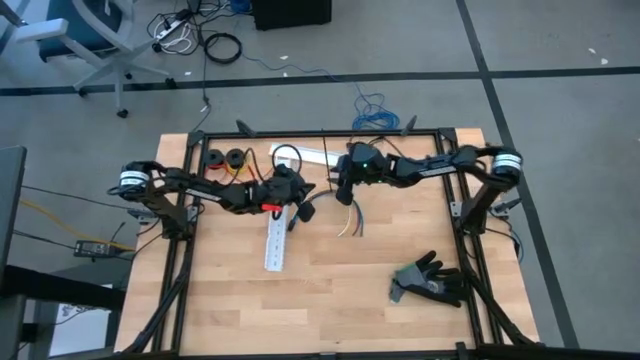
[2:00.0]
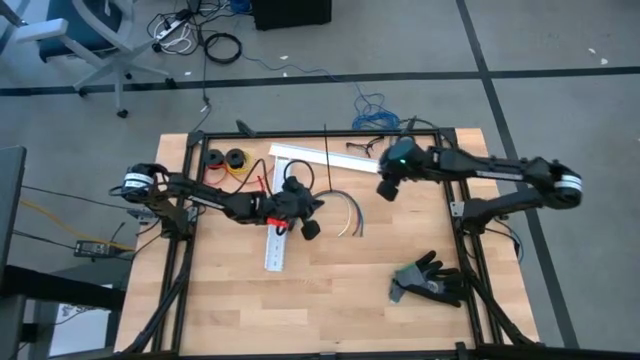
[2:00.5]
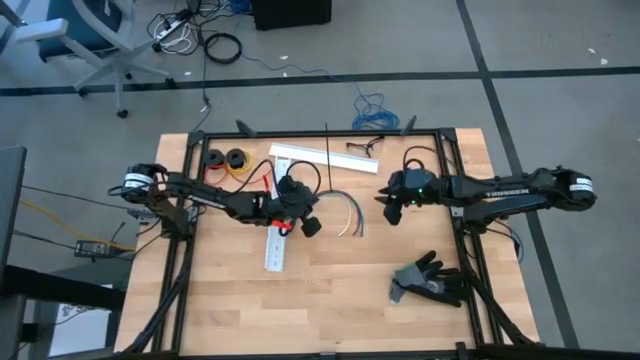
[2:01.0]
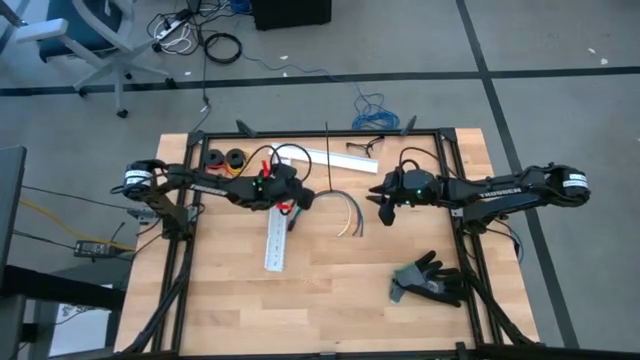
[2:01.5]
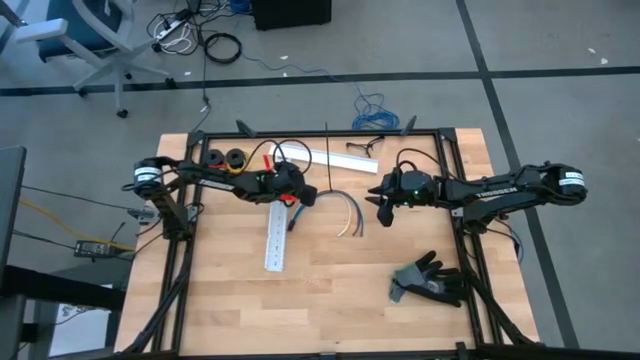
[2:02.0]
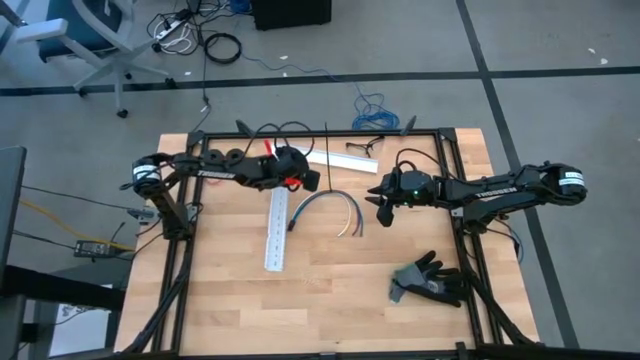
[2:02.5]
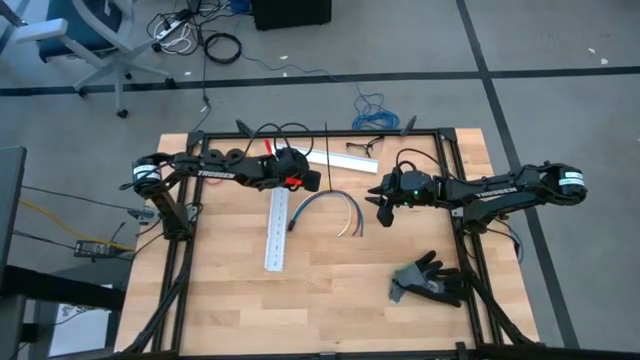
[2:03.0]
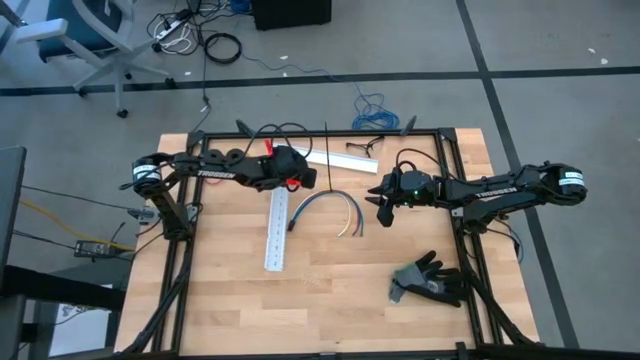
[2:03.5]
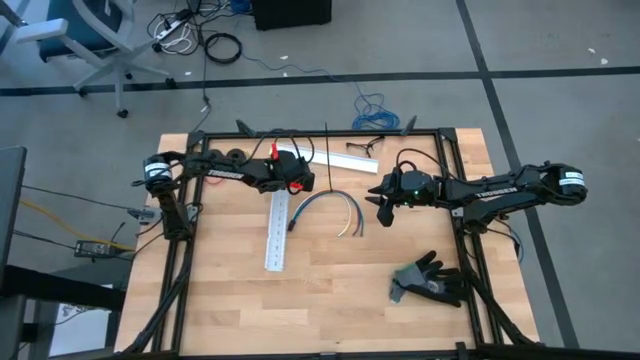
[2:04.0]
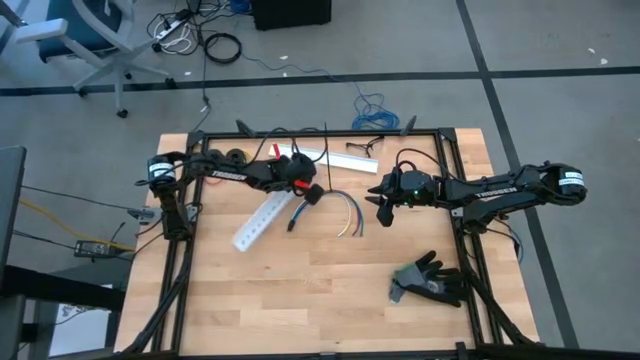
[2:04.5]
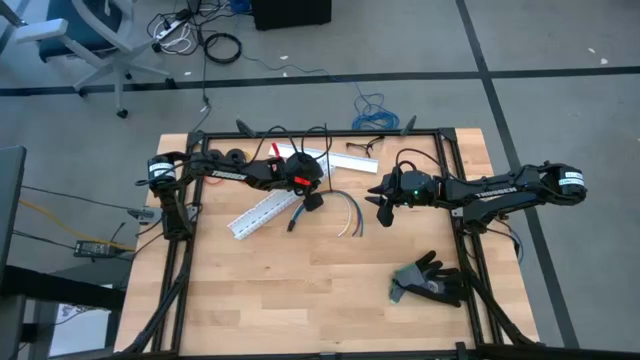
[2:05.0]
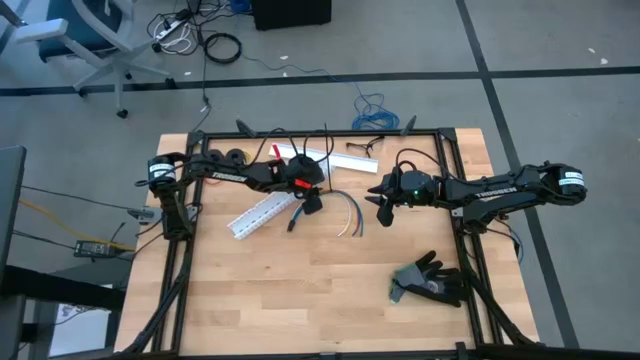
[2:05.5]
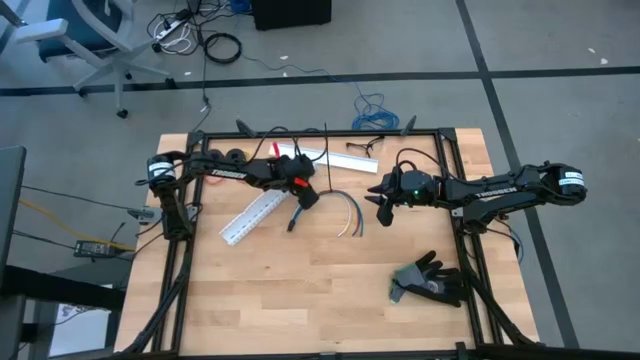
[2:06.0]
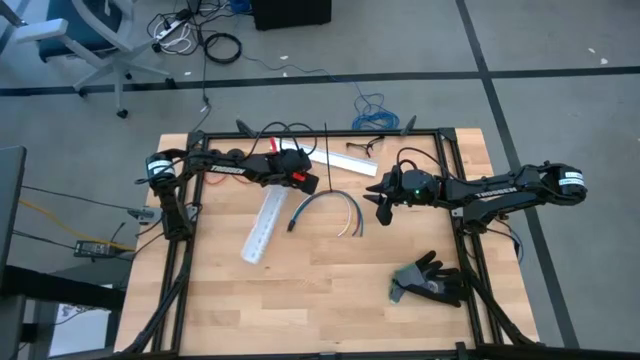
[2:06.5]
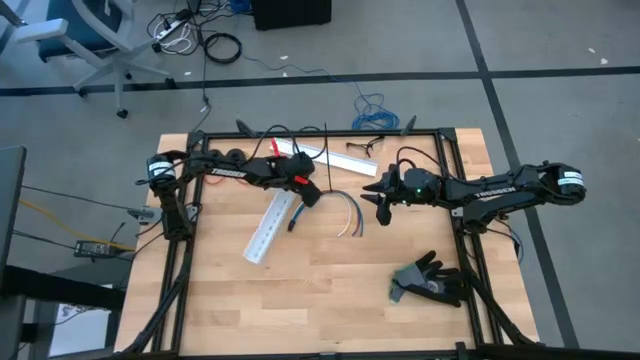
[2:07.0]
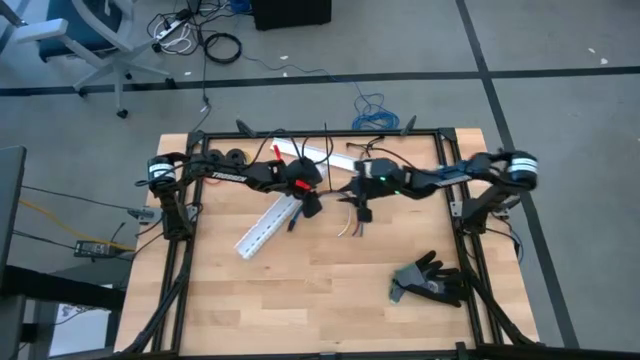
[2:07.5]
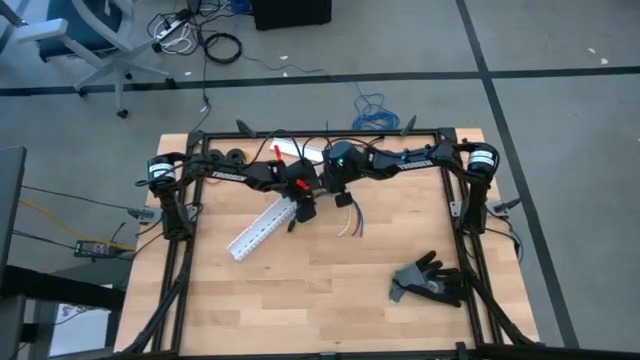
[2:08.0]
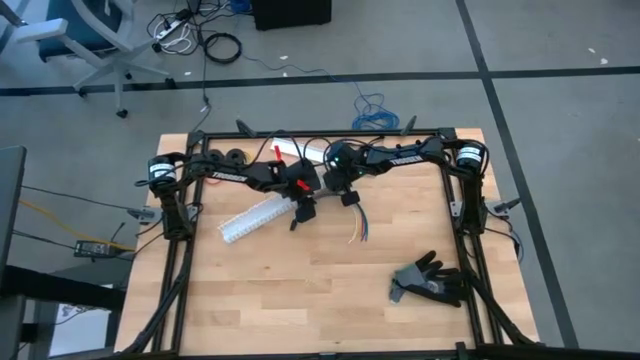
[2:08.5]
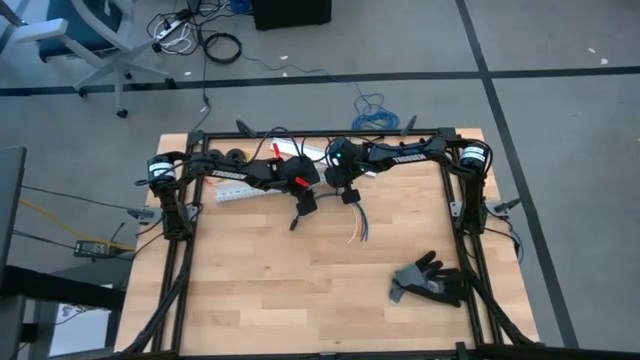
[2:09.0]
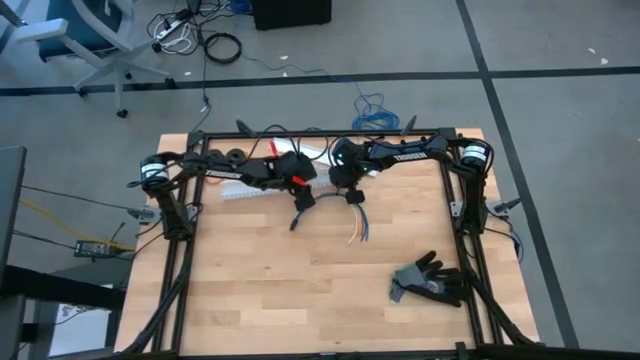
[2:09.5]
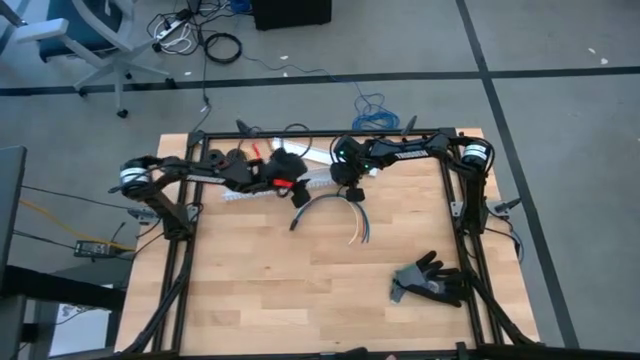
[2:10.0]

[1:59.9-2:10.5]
Task: Ziptie cables
Adjust the white cable duct

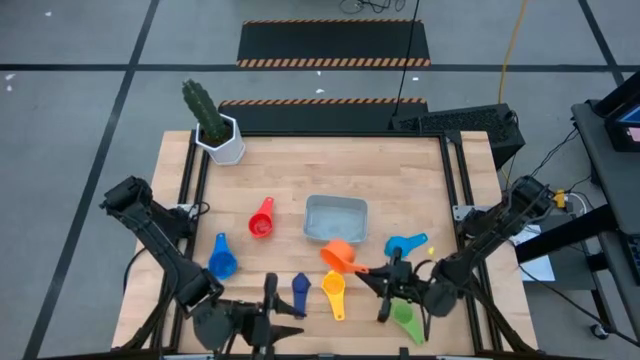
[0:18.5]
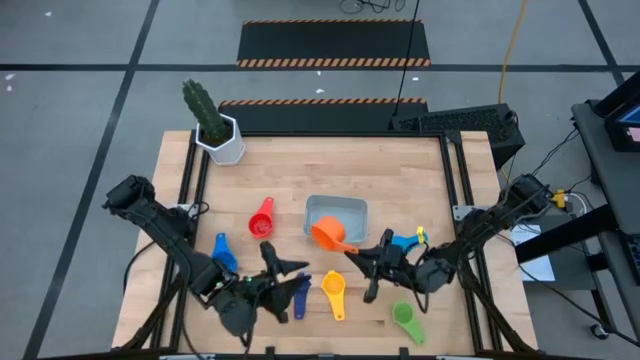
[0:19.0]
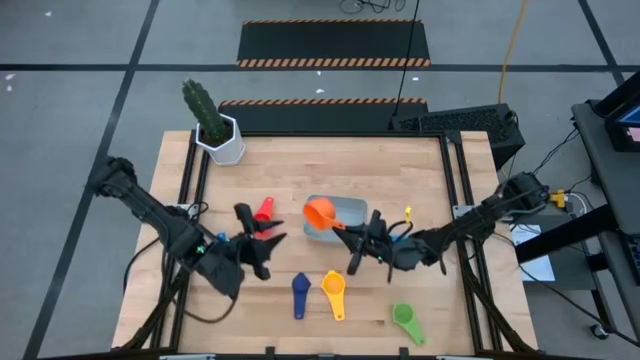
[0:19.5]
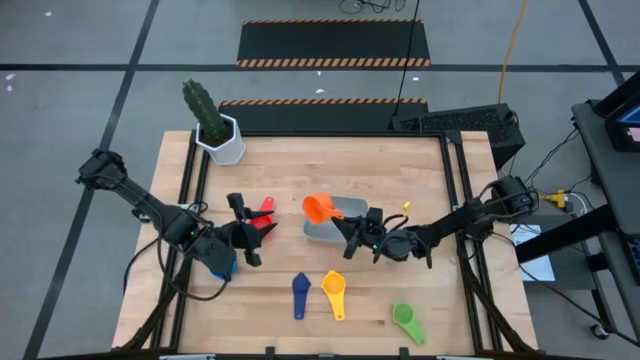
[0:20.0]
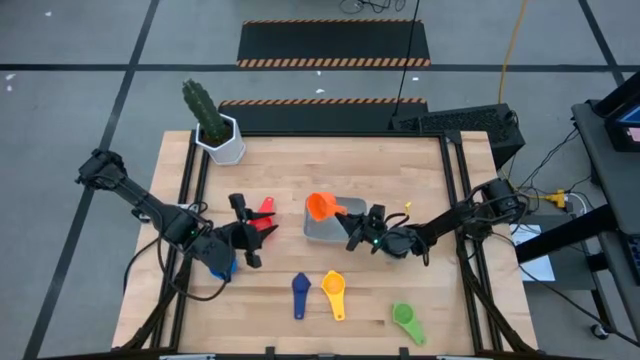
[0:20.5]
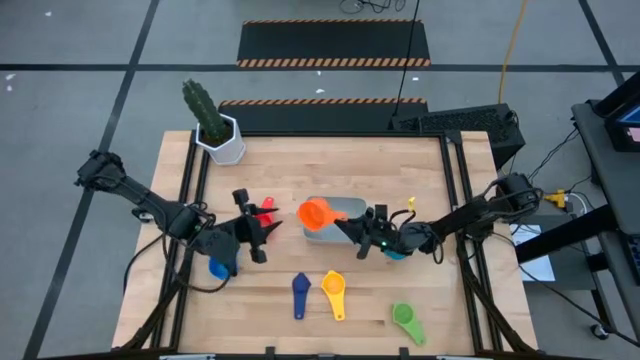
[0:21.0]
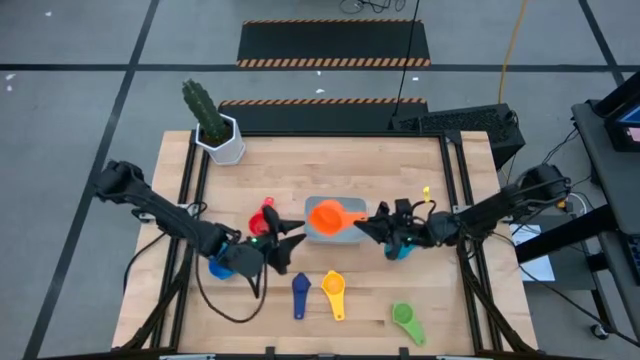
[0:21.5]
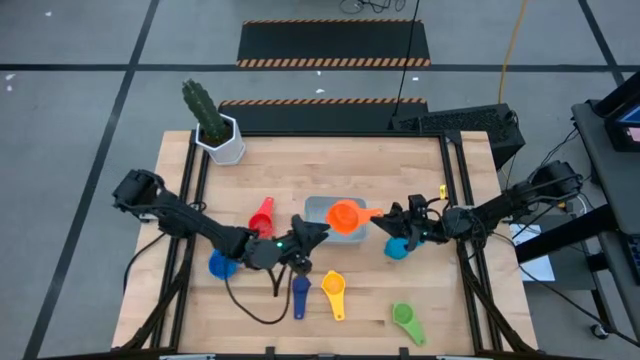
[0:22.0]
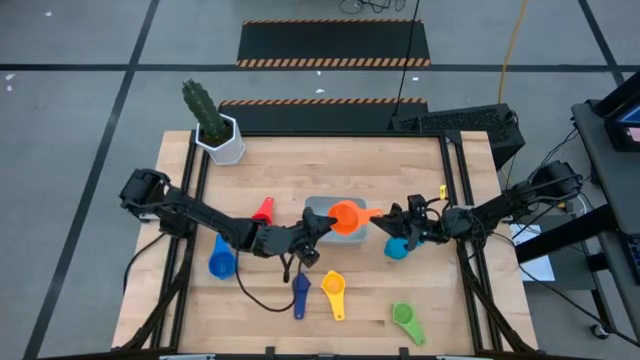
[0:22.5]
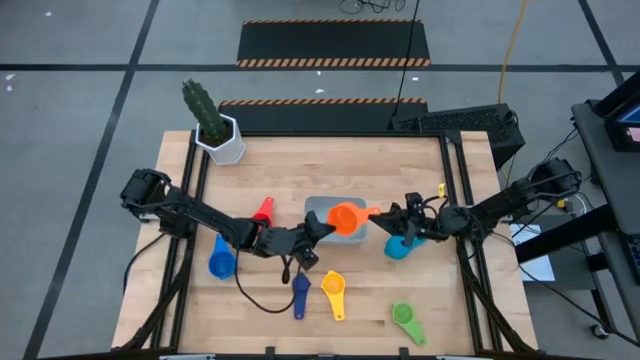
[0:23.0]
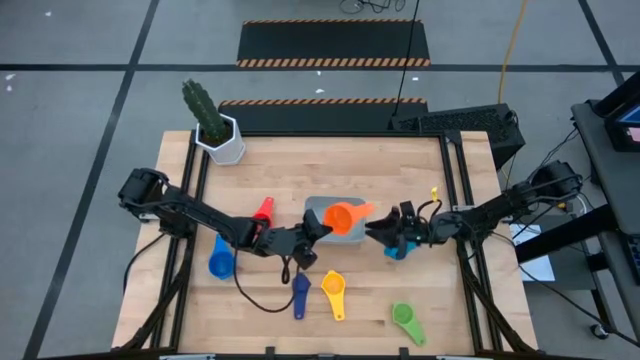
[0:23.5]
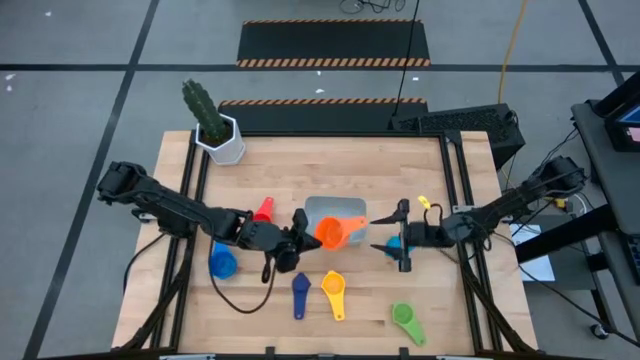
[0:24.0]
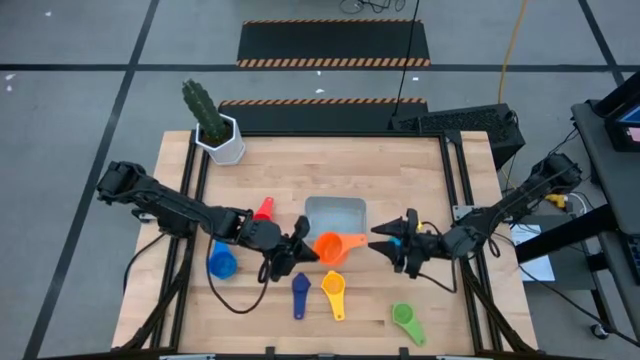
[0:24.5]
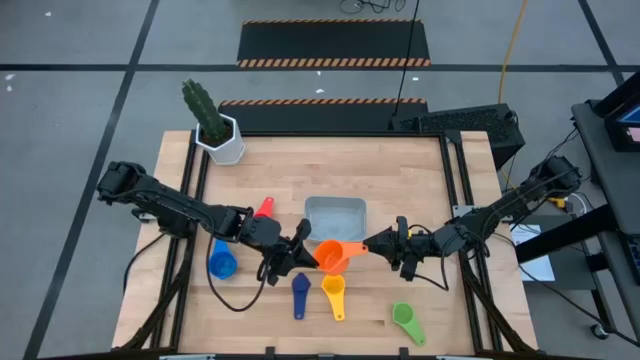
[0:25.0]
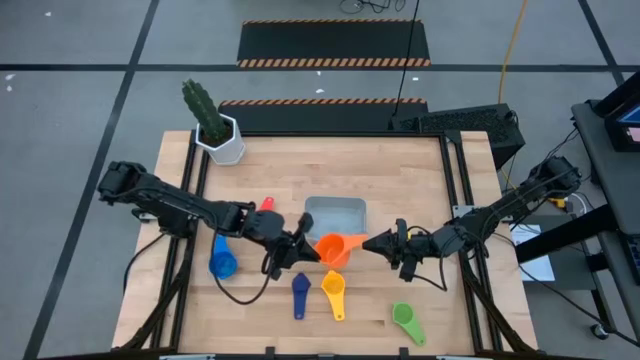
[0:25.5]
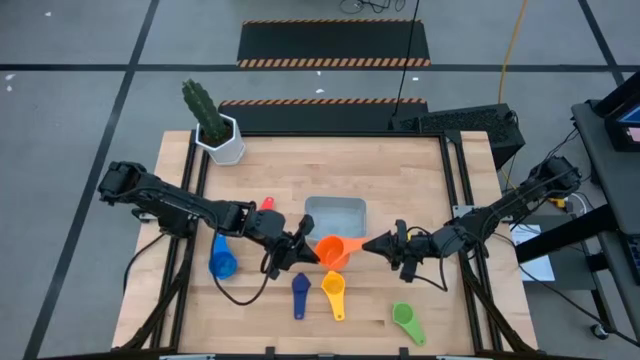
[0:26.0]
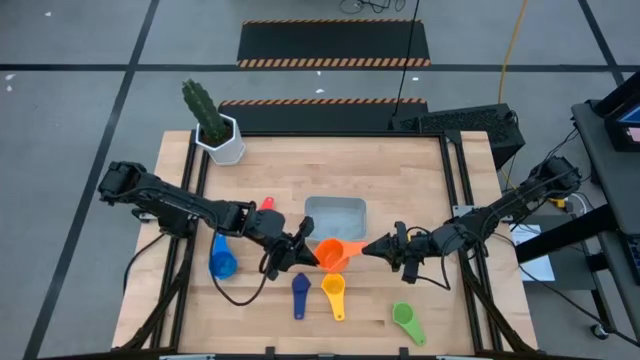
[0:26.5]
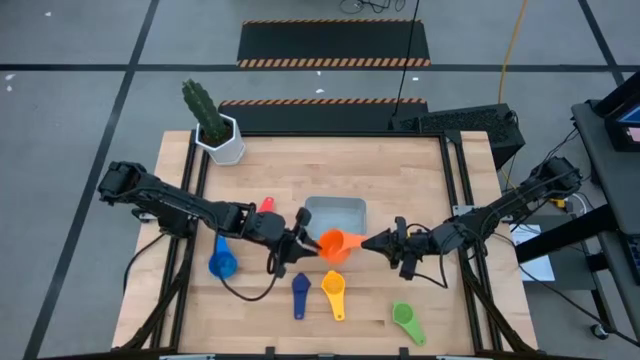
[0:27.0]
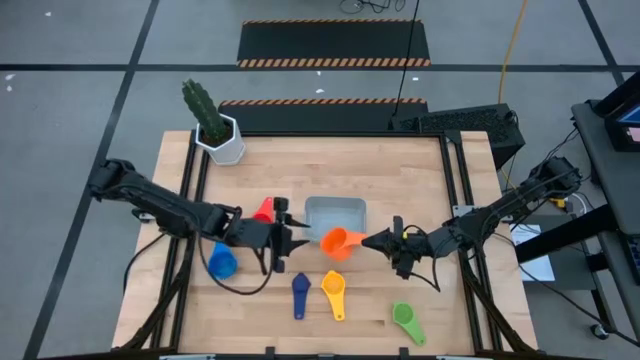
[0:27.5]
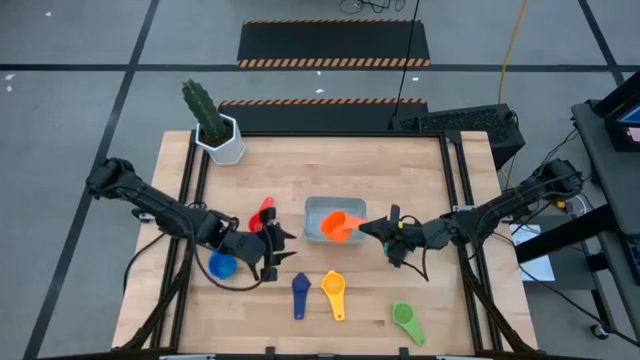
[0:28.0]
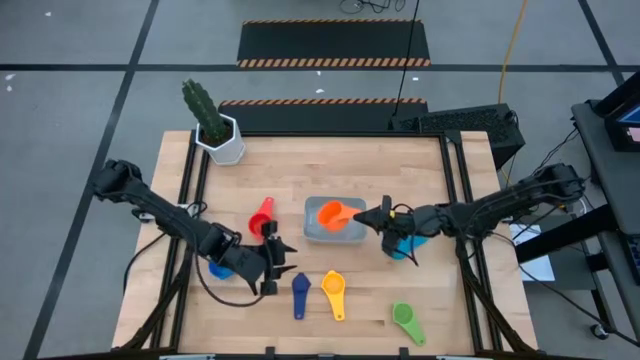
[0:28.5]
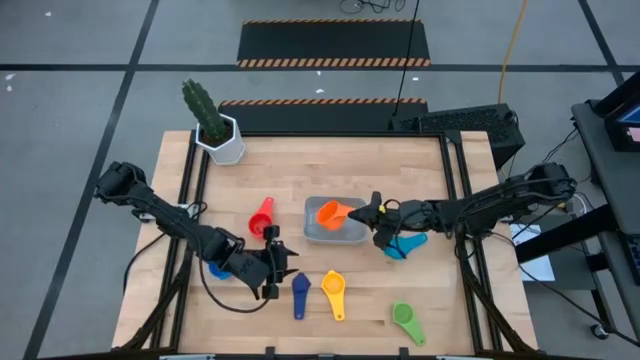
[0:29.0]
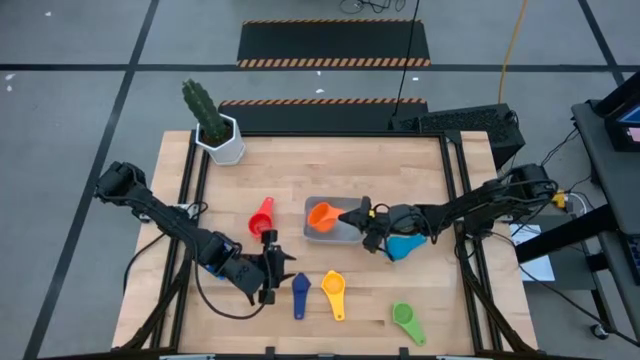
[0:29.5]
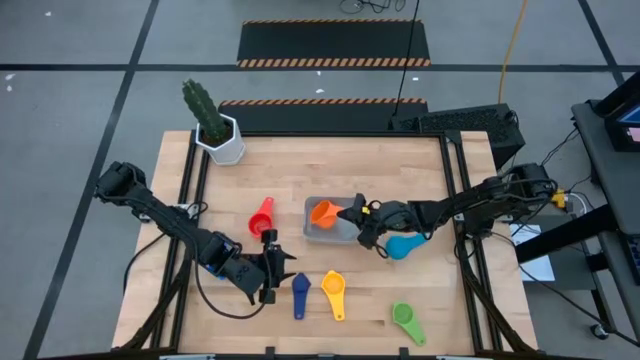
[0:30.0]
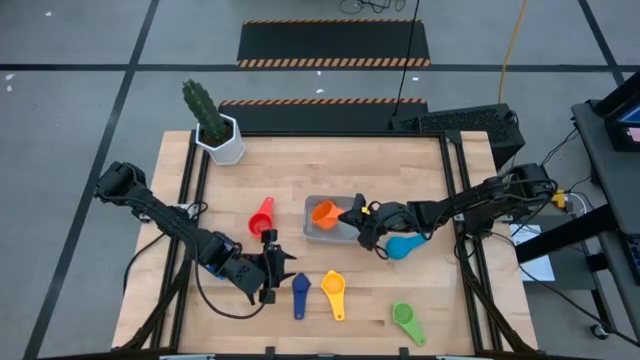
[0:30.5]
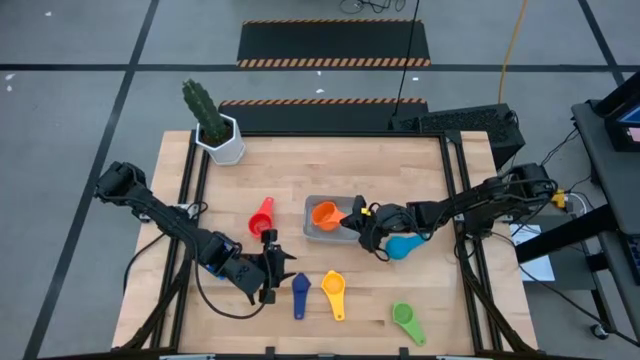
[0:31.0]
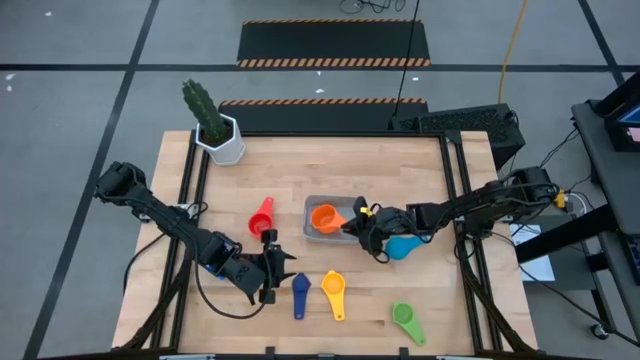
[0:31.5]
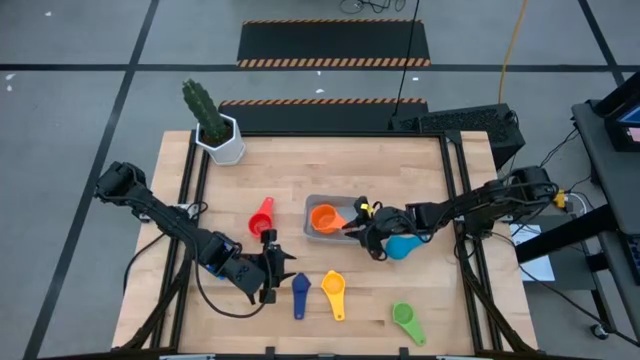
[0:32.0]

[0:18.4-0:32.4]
Task: Nest measuring cups in basket
Put the orange measuring cup into the bin
